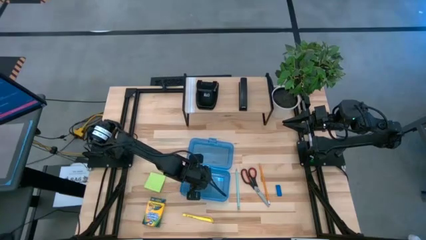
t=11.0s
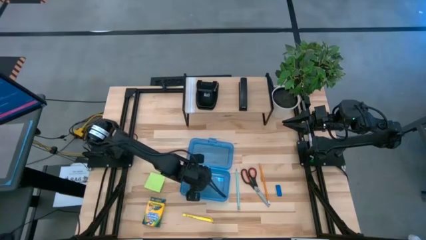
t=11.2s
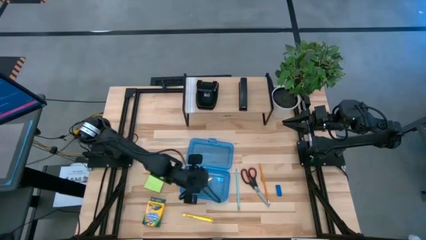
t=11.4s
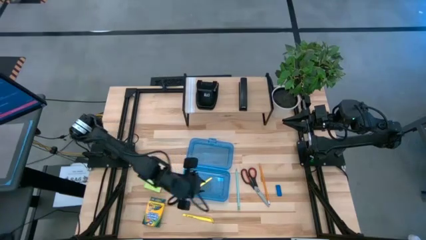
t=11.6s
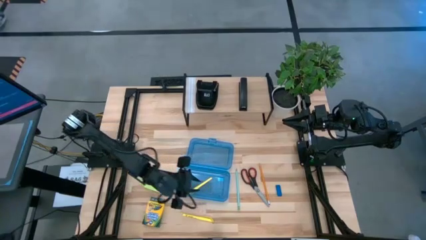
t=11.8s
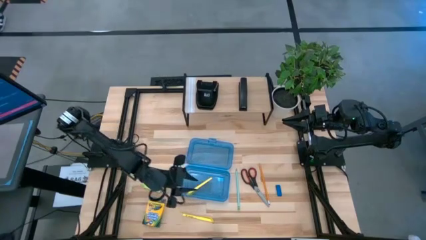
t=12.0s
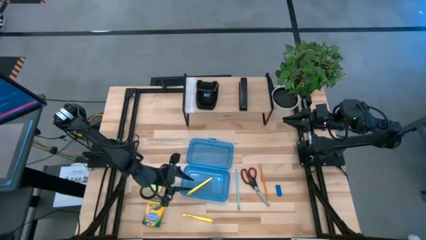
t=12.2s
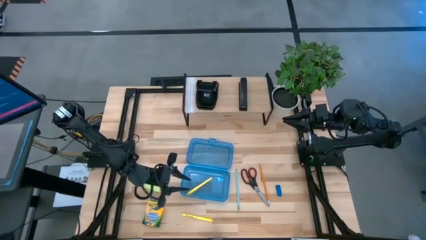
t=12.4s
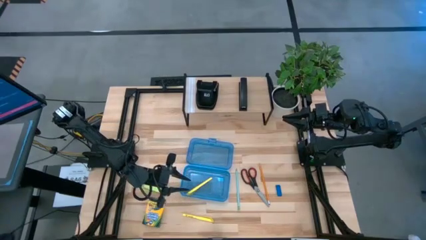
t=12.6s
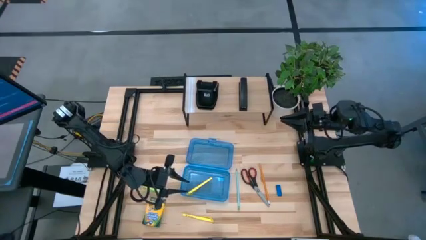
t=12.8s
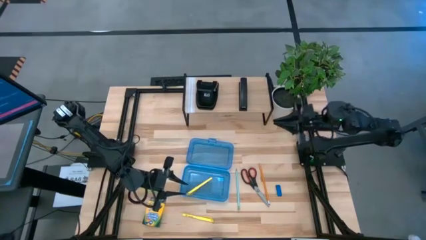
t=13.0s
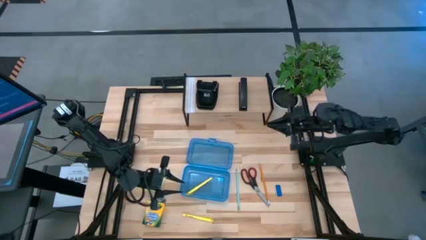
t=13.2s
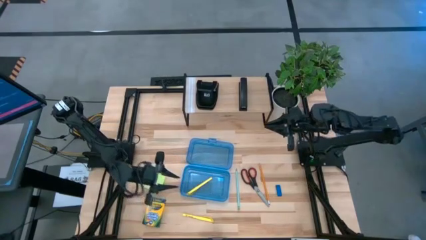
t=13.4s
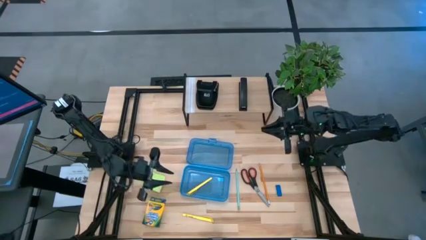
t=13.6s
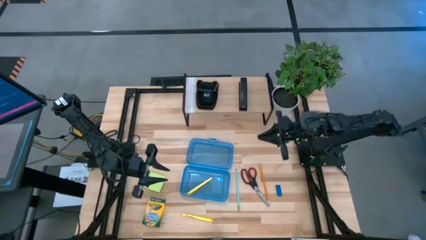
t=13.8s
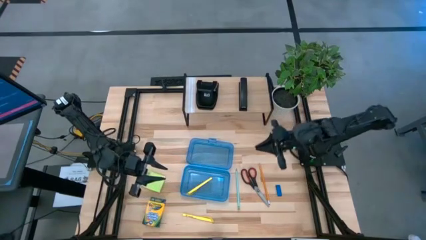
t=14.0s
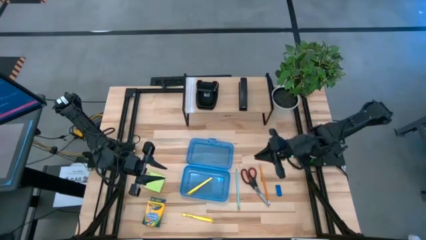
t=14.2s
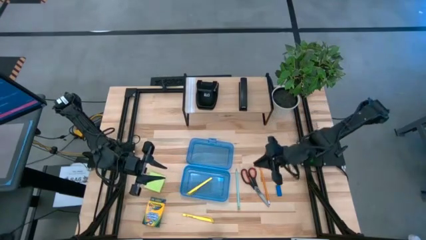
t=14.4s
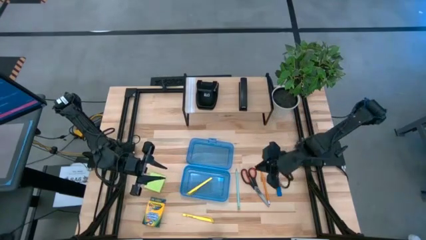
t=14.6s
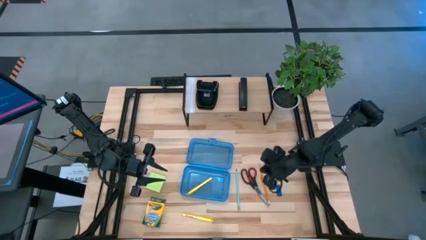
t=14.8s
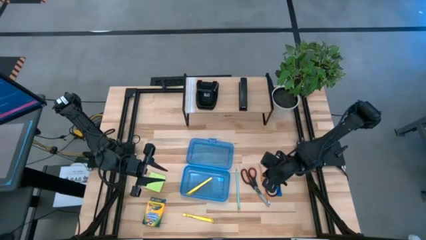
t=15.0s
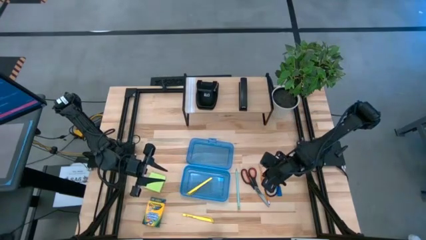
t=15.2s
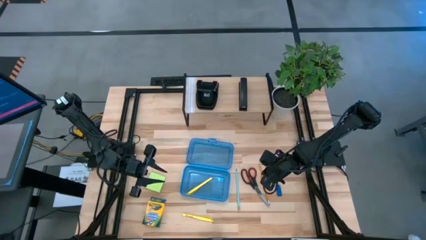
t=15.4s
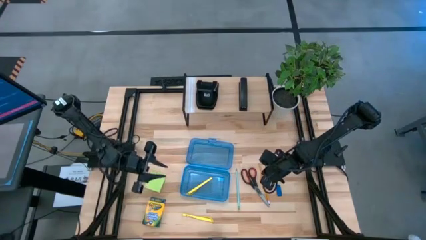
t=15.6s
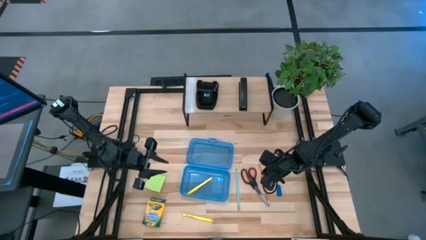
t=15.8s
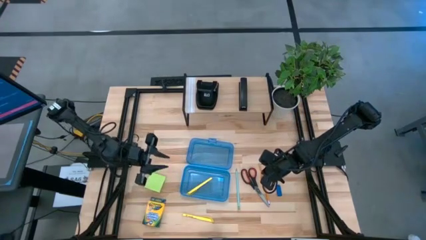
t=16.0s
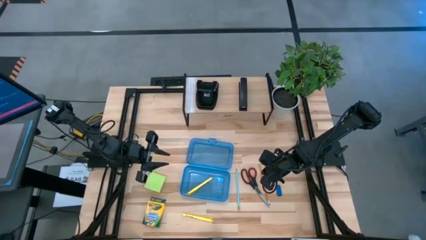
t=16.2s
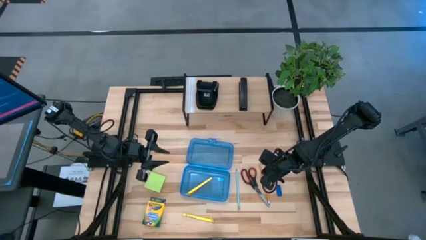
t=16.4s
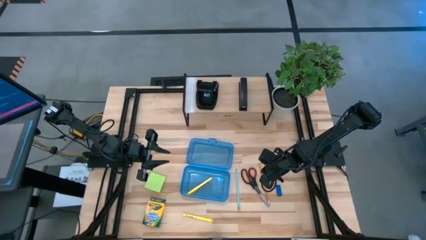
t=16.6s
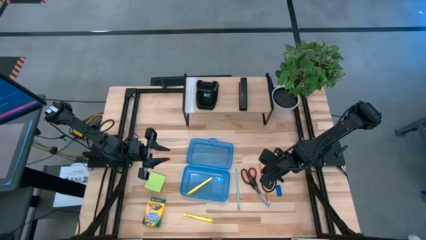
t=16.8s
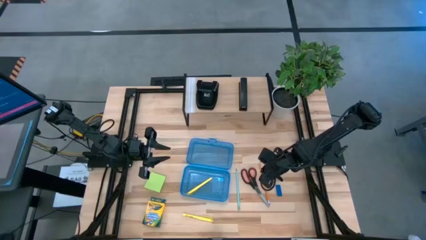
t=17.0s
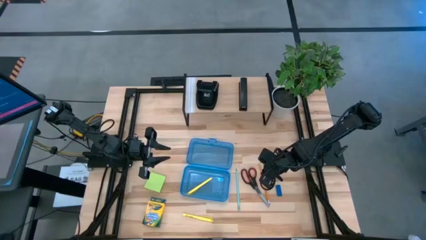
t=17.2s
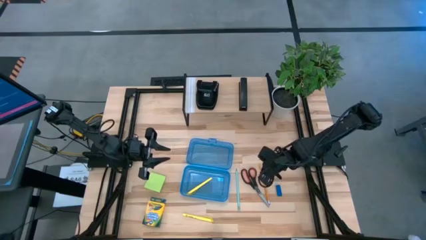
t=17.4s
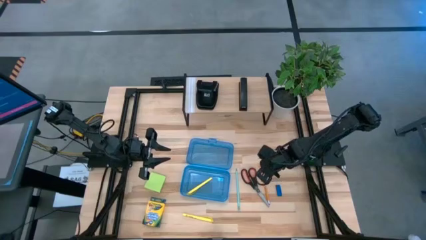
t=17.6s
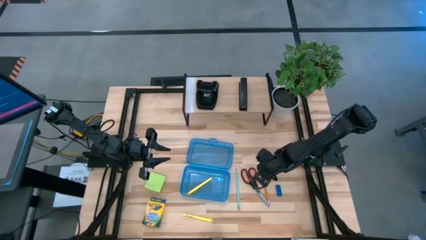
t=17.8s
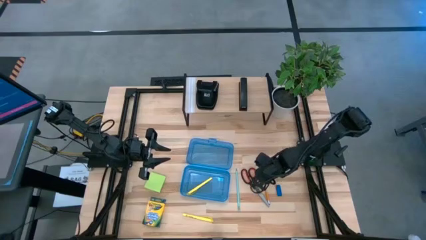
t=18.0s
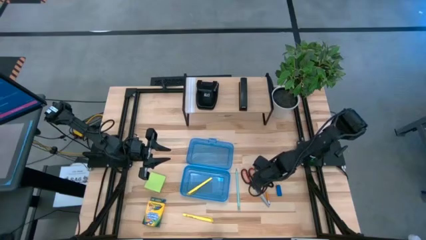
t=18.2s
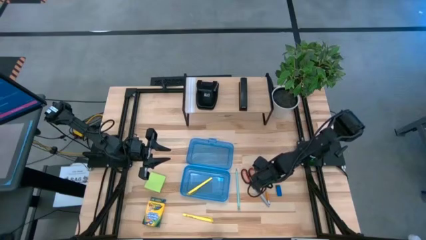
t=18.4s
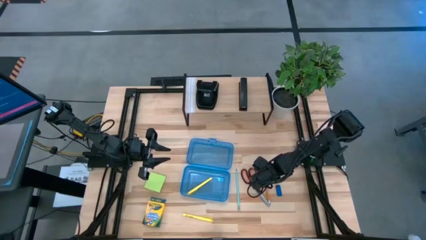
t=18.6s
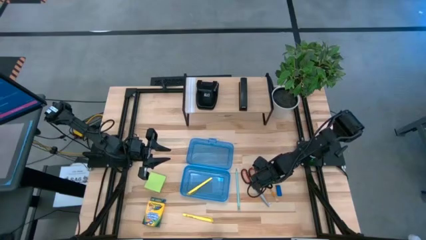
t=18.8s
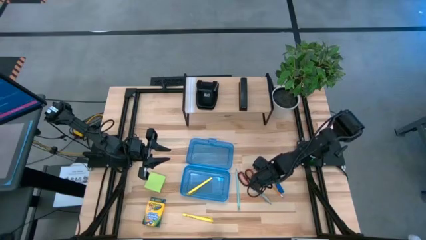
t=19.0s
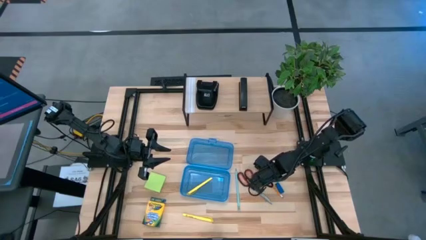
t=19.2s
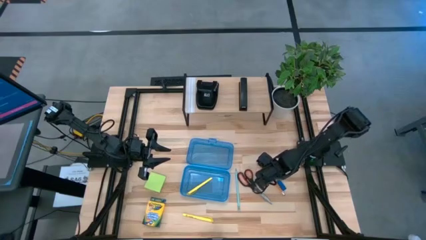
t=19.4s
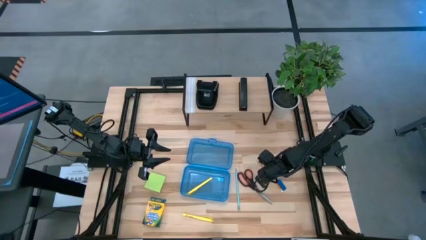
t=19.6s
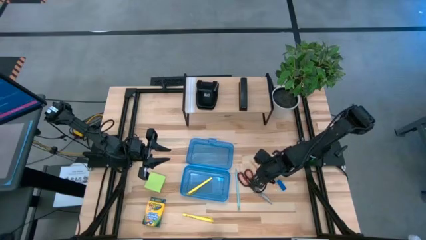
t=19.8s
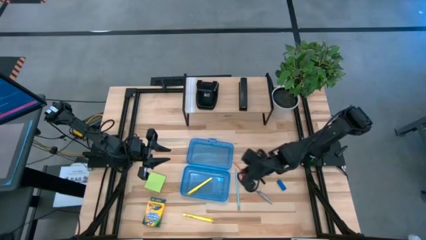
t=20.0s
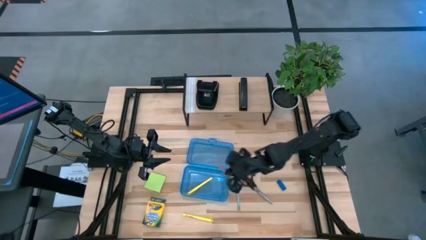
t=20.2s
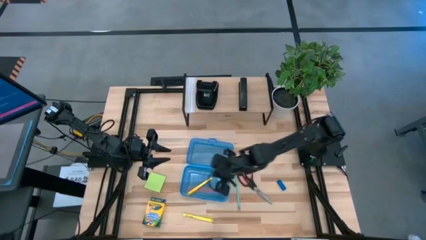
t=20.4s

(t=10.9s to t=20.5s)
Task: Pack school essentials
Put the orange pencil into the blue supply box

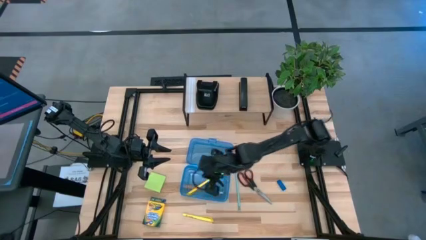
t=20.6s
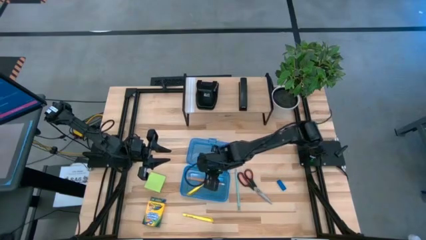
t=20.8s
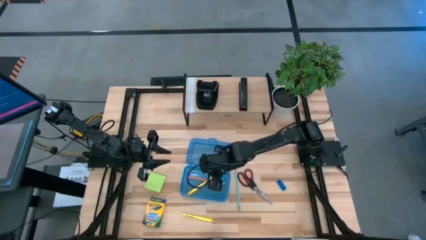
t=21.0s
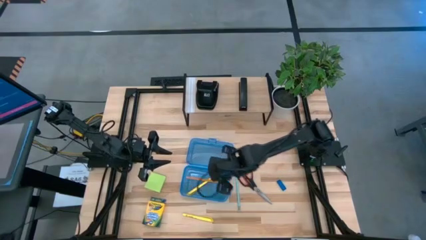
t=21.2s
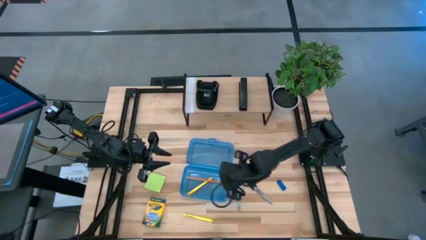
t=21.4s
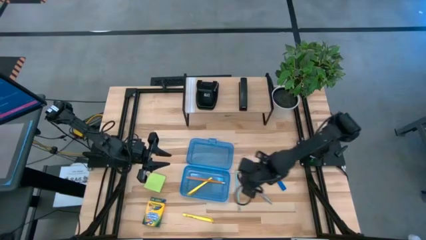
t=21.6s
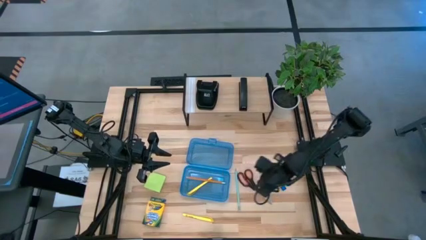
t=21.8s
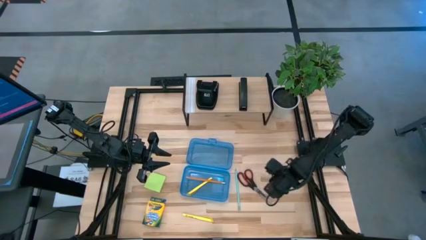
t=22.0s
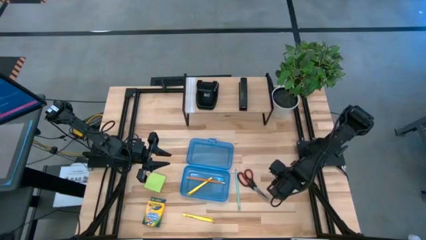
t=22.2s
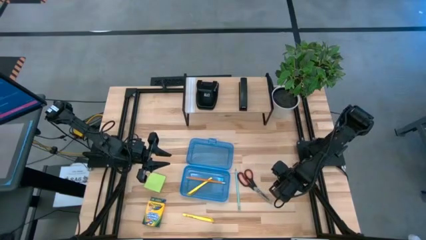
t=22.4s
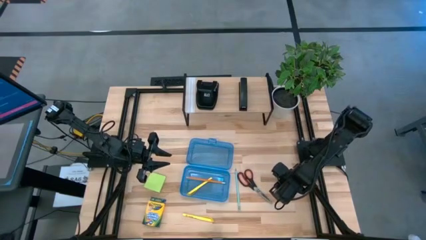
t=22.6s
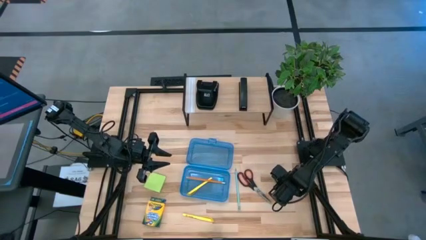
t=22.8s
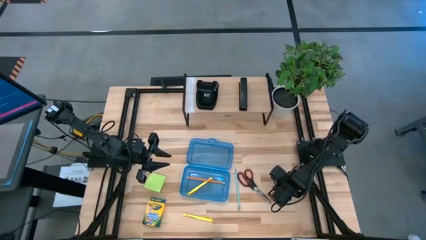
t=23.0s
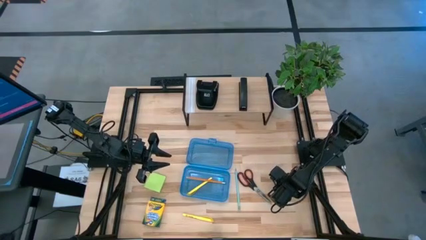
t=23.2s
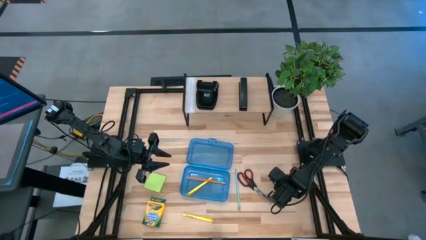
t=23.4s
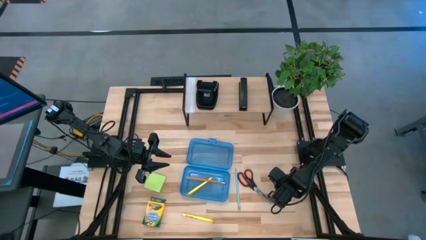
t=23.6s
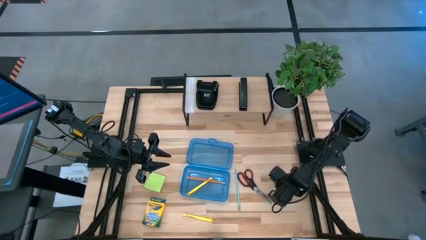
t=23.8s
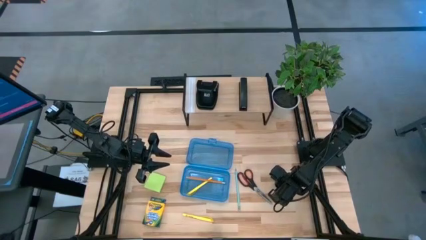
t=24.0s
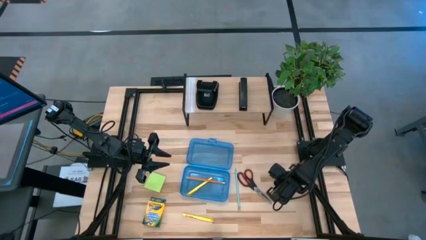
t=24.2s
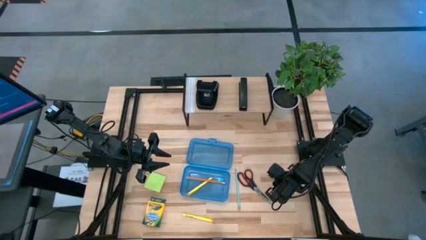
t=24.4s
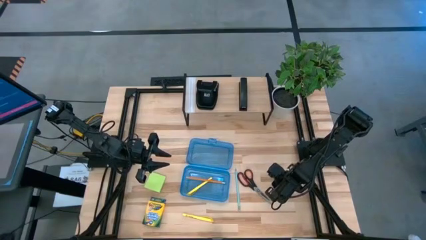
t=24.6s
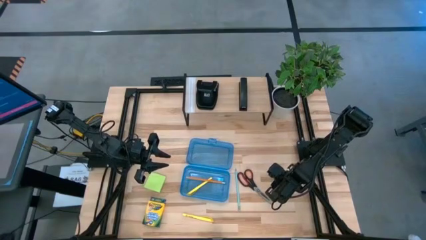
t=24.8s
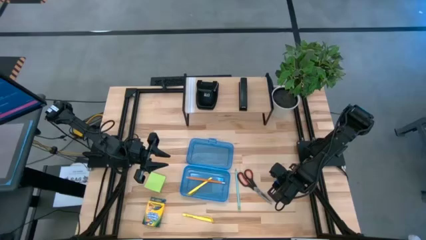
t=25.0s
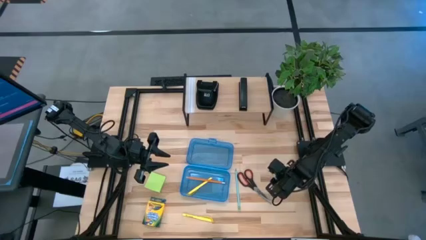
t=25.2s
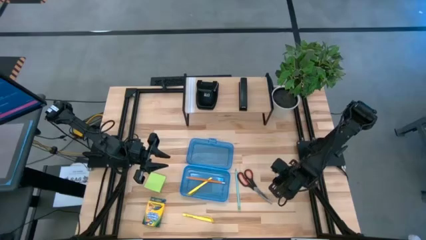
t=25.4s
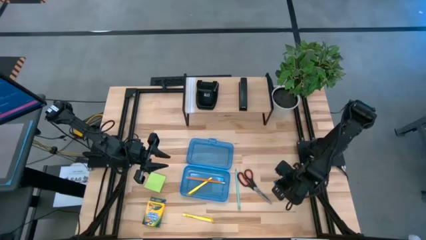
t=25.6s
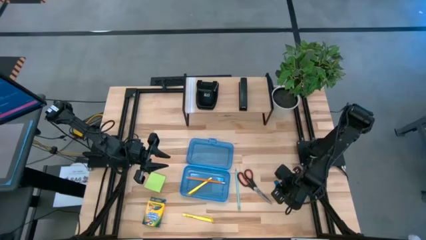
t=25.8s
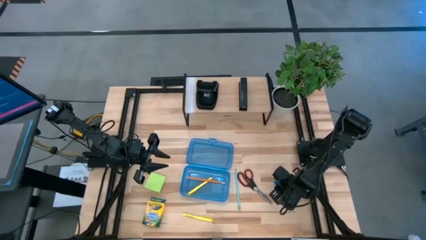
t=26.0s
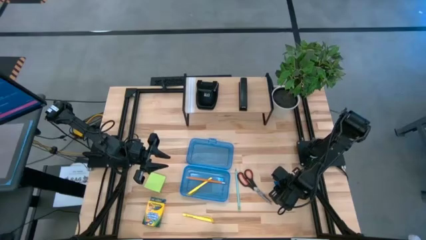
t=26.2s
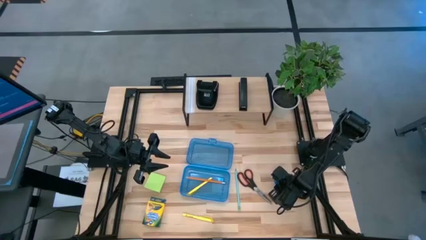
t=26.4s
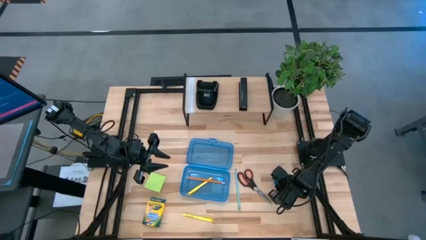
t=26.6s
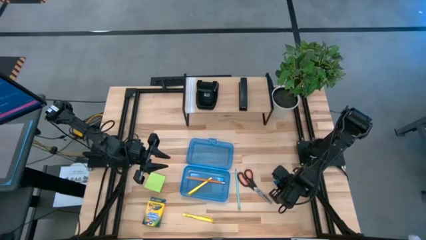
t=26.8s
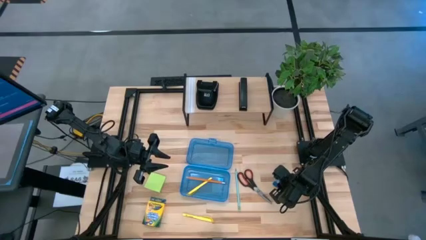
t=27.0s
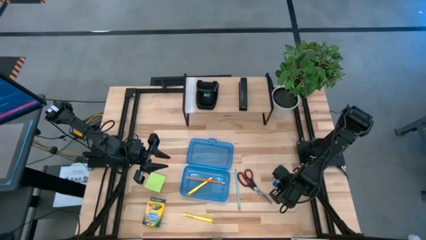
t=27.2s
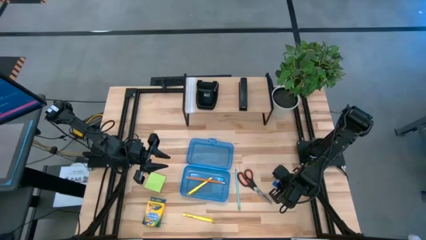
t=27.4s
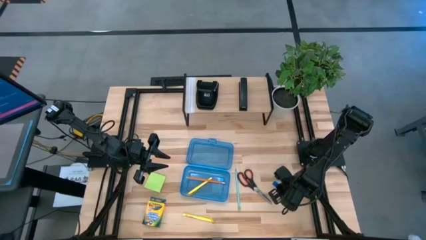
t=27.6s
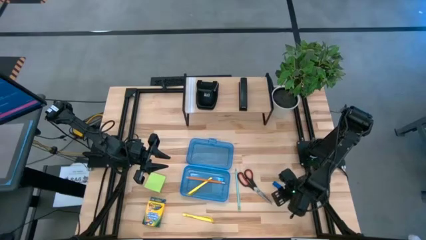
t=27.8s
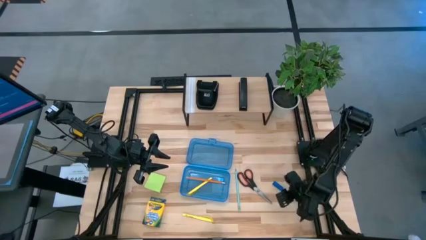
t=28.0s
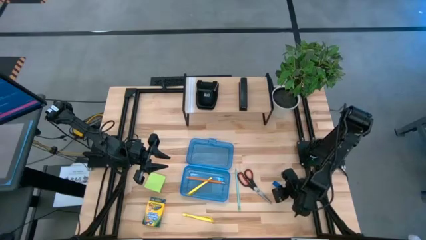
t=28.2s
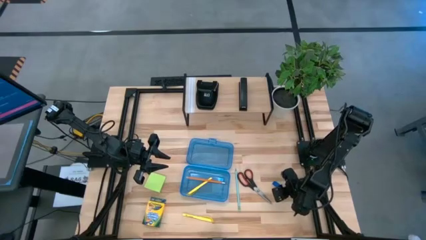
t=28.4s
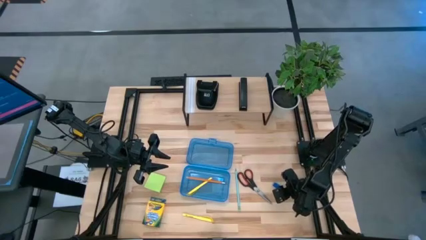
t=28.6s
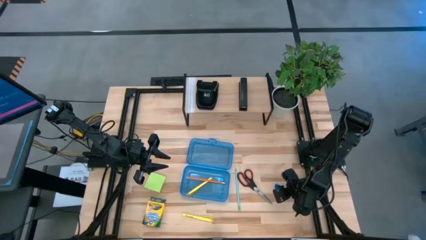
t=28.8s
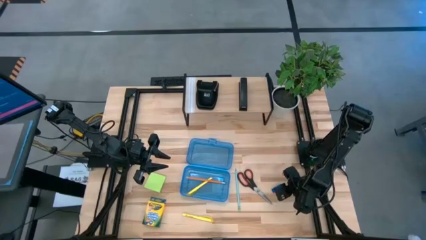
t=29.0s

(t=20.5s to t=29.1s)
Put the blue eraser into the blue supply box
